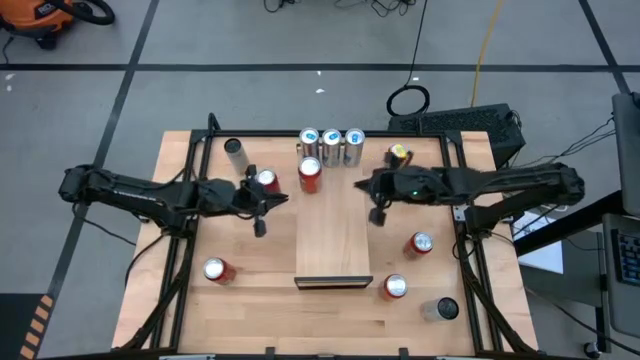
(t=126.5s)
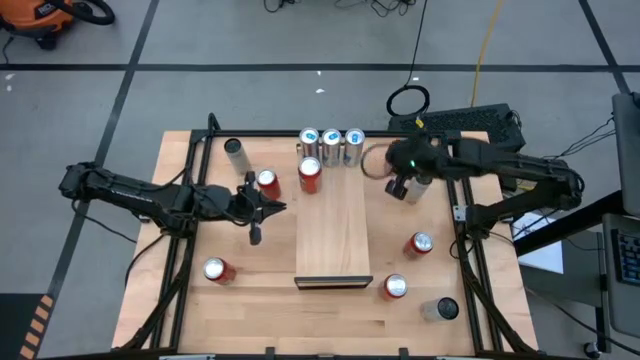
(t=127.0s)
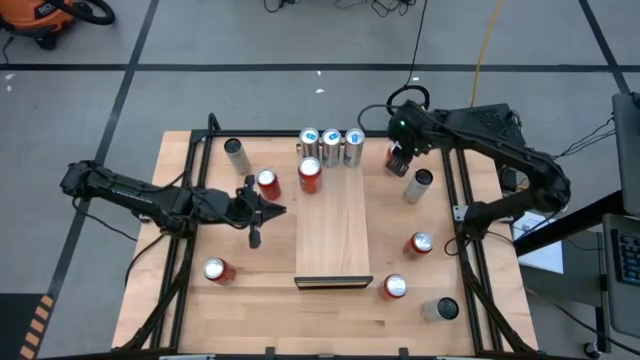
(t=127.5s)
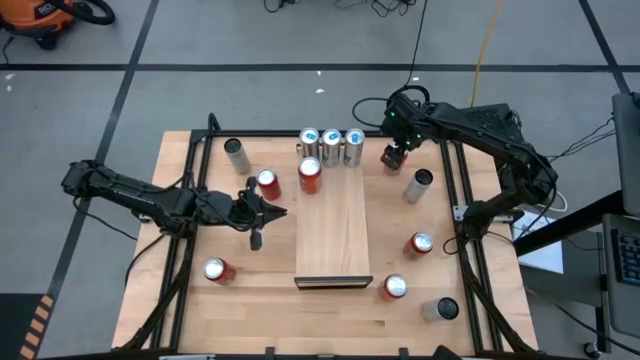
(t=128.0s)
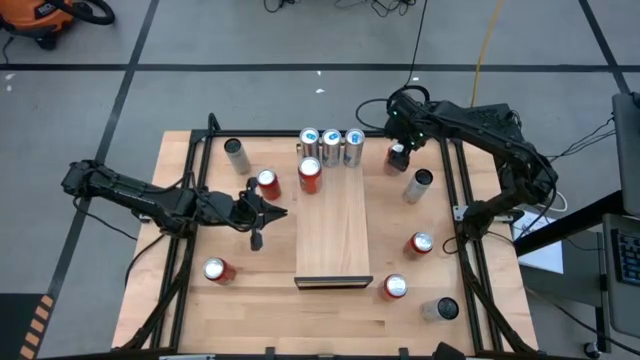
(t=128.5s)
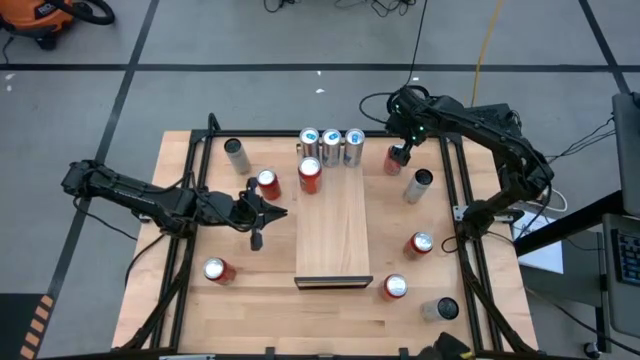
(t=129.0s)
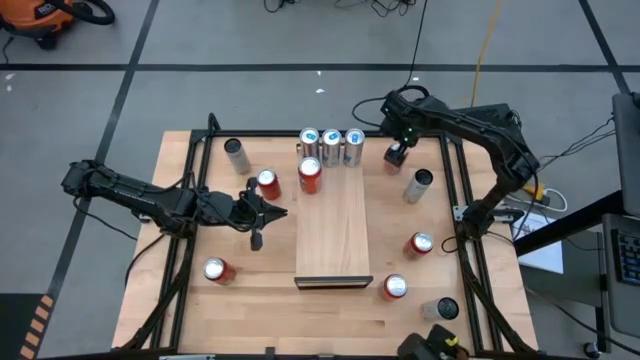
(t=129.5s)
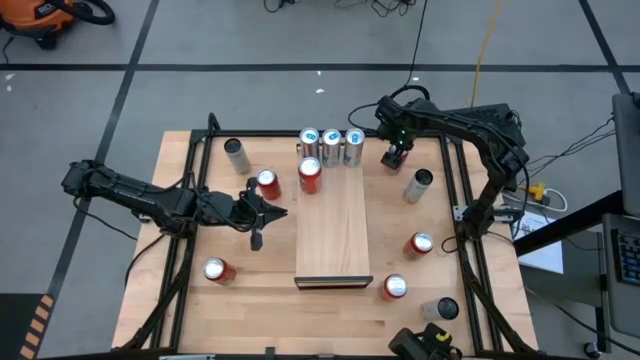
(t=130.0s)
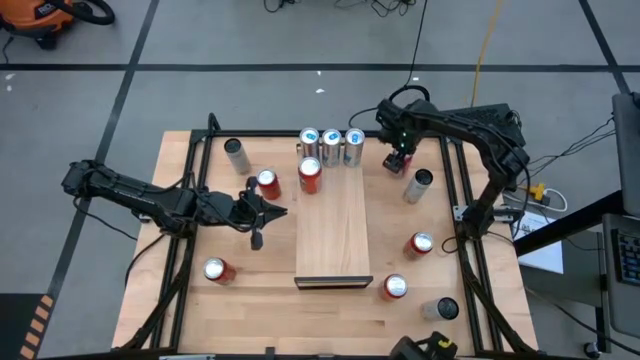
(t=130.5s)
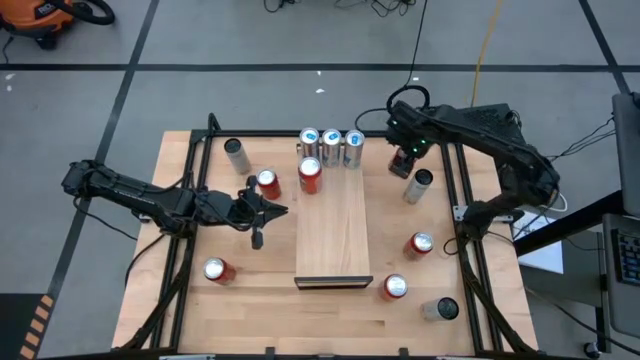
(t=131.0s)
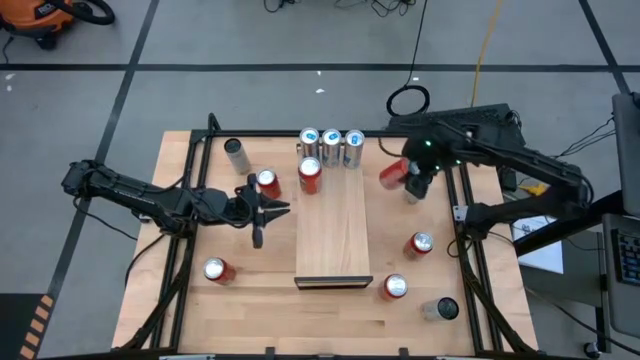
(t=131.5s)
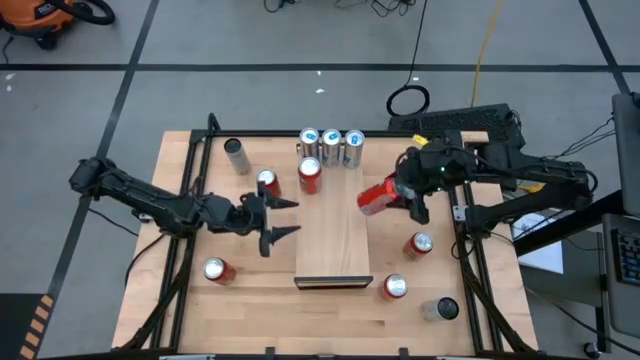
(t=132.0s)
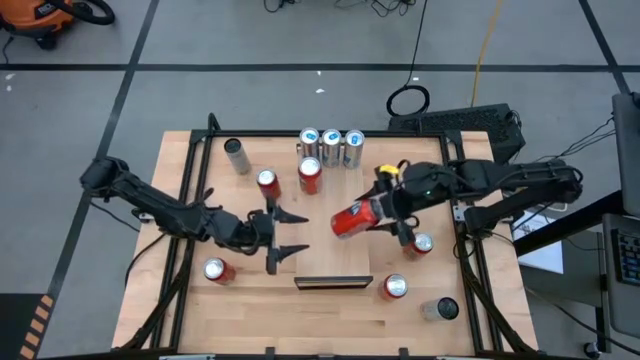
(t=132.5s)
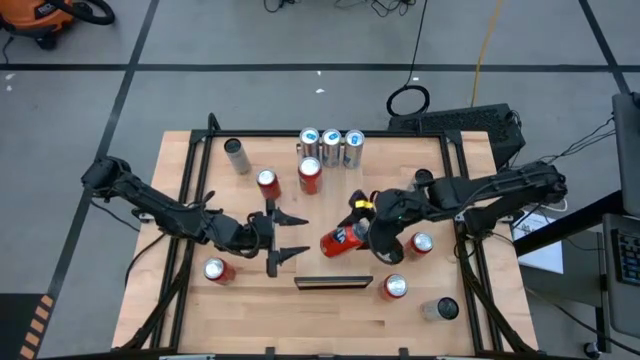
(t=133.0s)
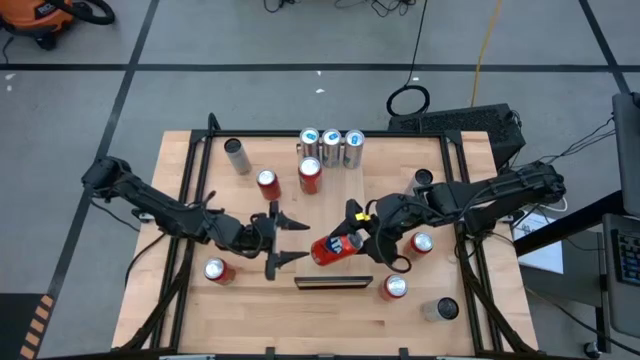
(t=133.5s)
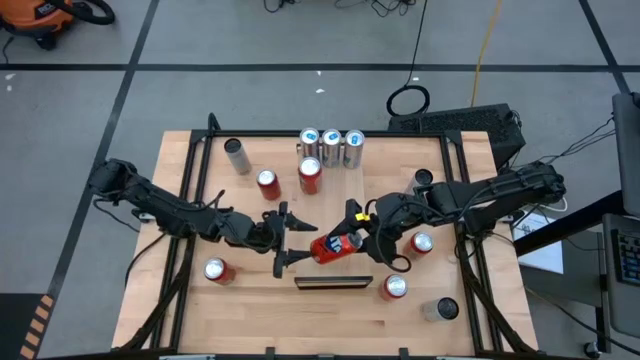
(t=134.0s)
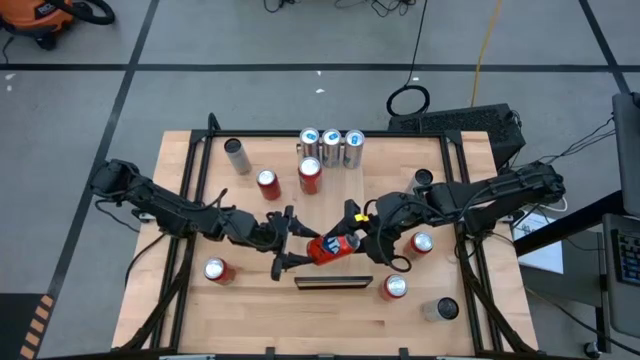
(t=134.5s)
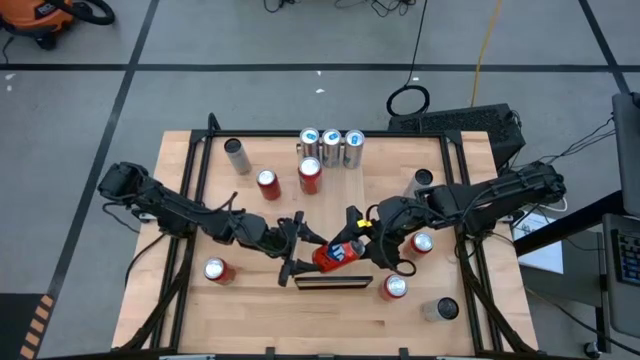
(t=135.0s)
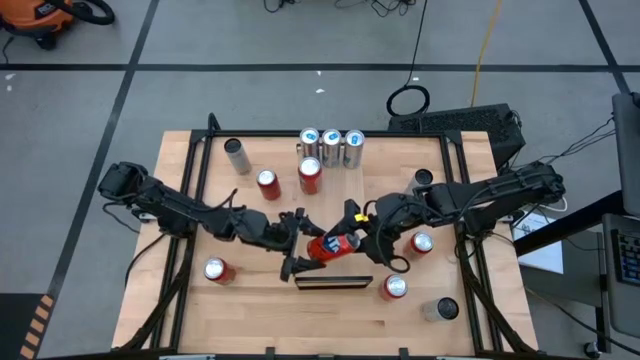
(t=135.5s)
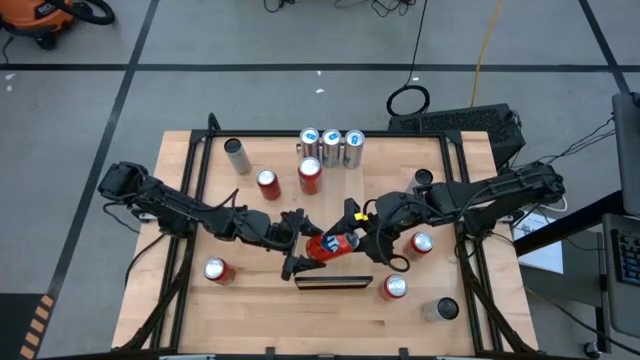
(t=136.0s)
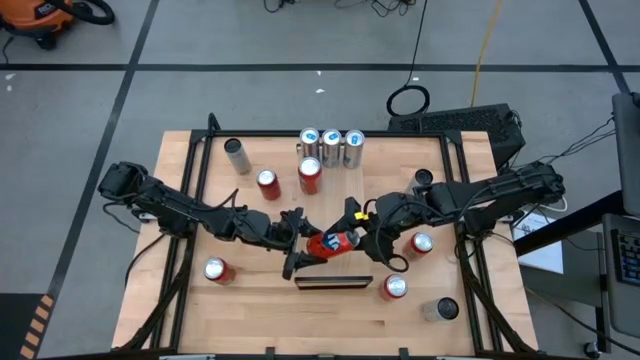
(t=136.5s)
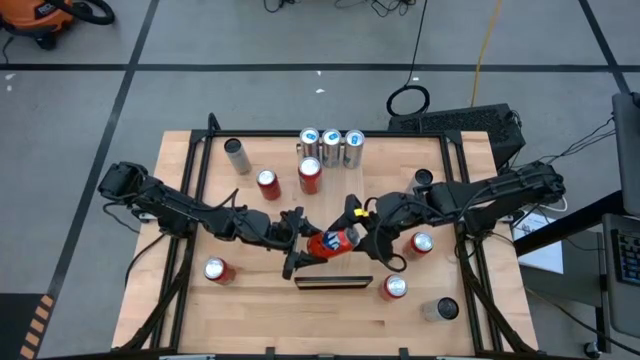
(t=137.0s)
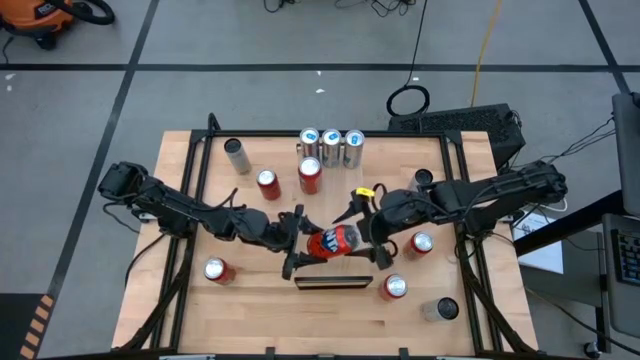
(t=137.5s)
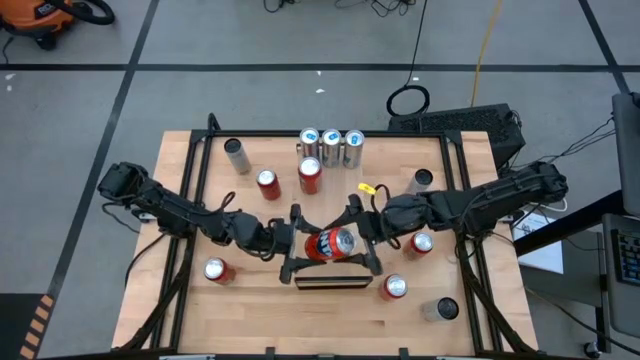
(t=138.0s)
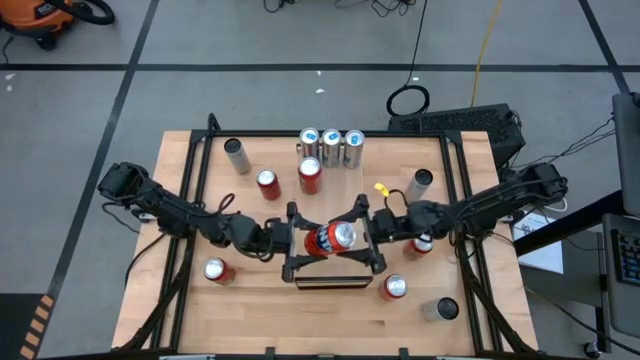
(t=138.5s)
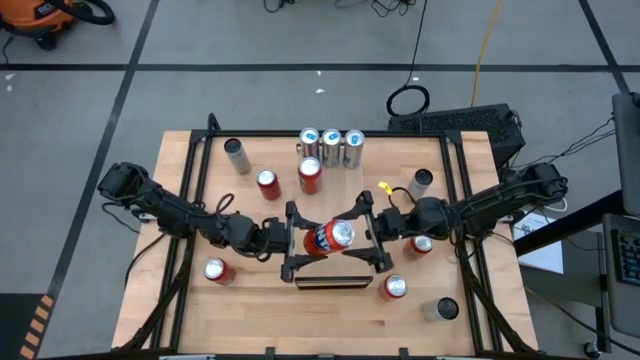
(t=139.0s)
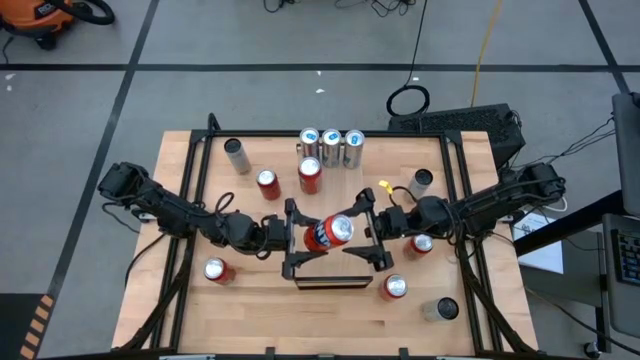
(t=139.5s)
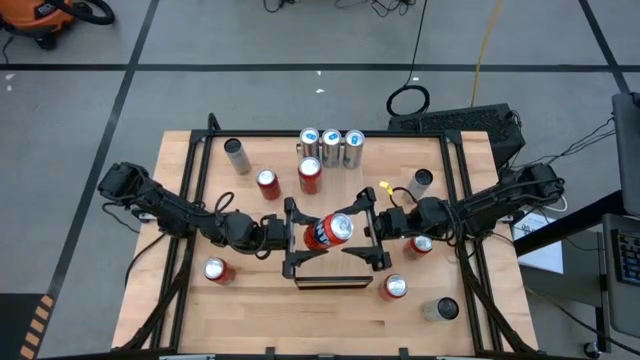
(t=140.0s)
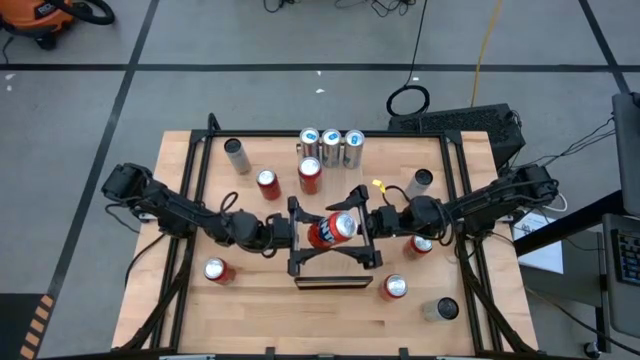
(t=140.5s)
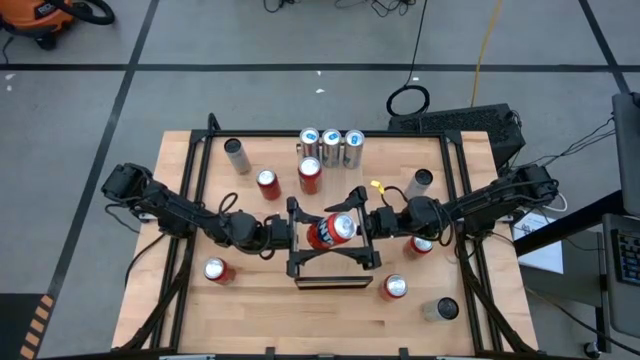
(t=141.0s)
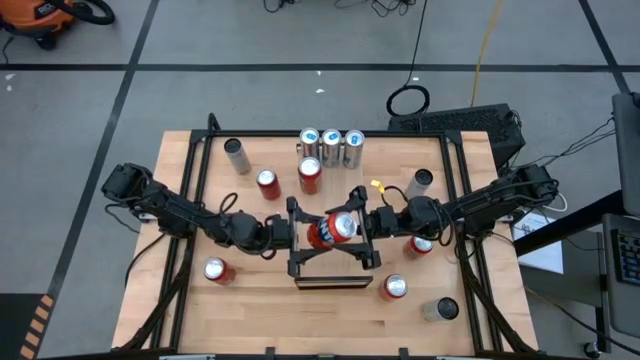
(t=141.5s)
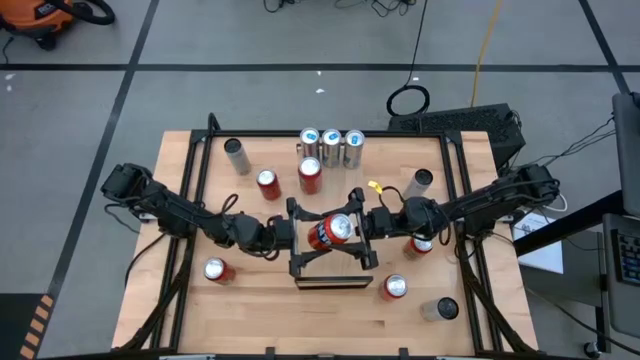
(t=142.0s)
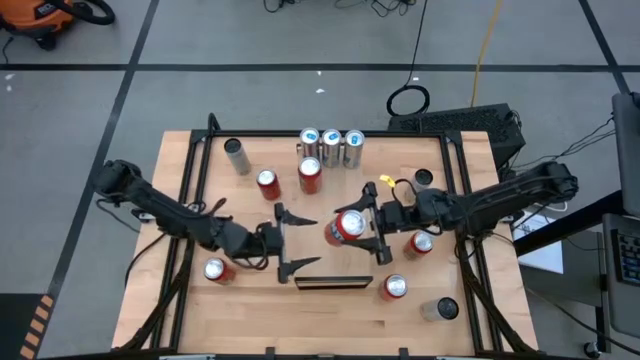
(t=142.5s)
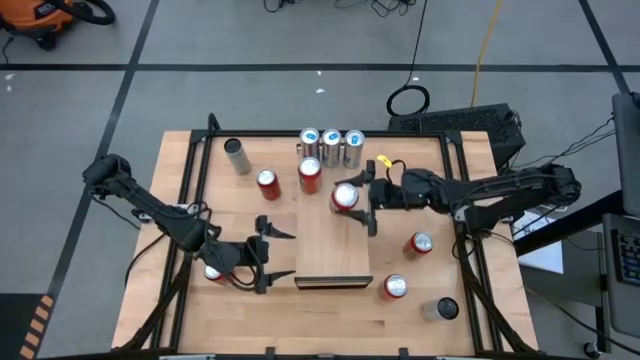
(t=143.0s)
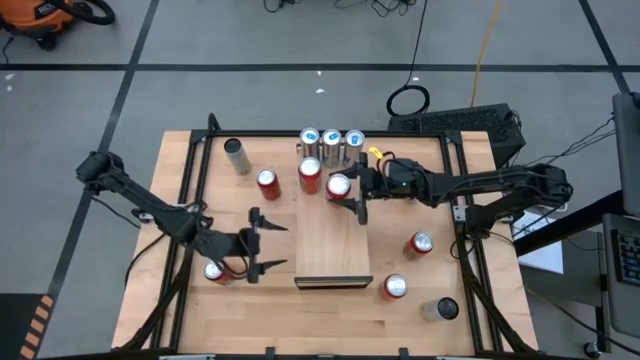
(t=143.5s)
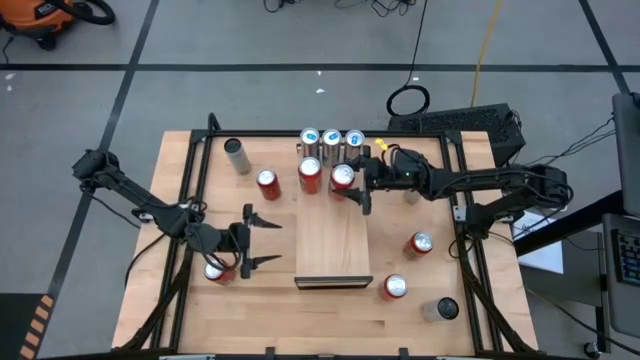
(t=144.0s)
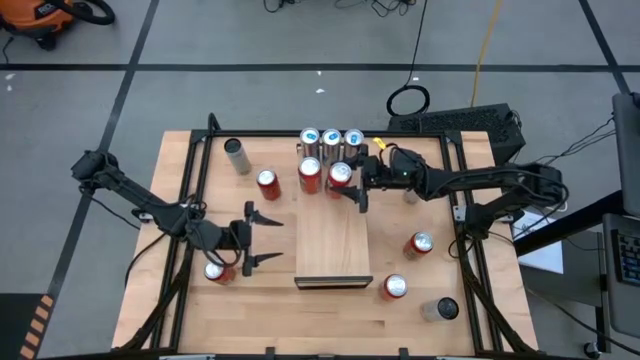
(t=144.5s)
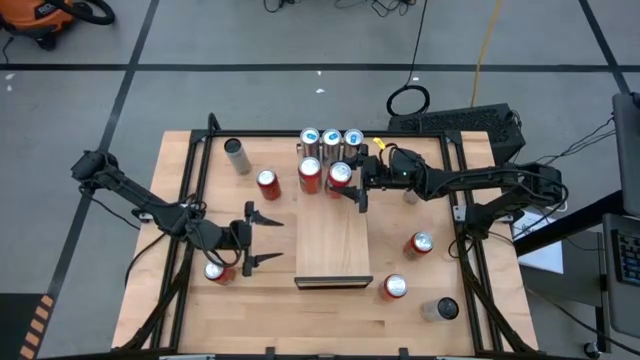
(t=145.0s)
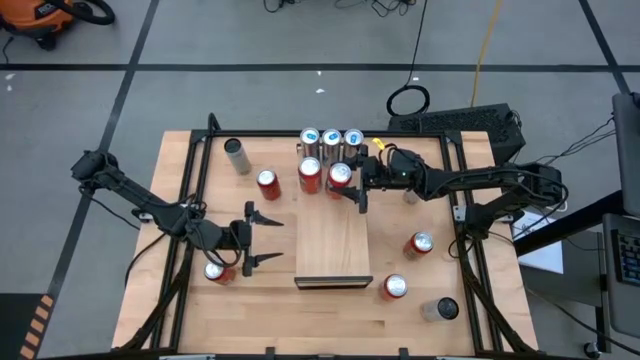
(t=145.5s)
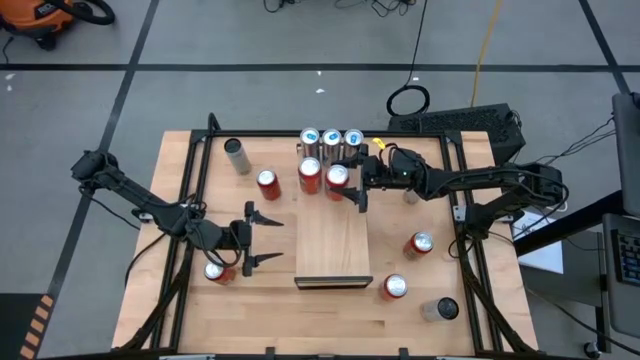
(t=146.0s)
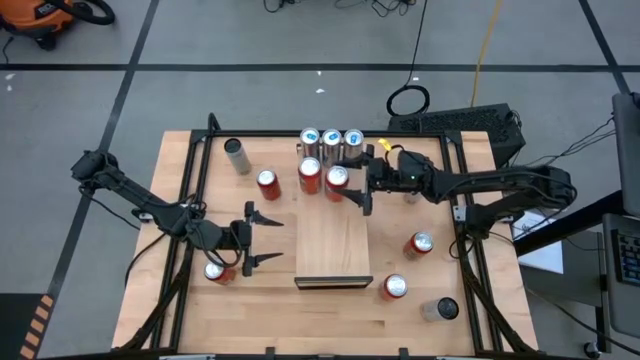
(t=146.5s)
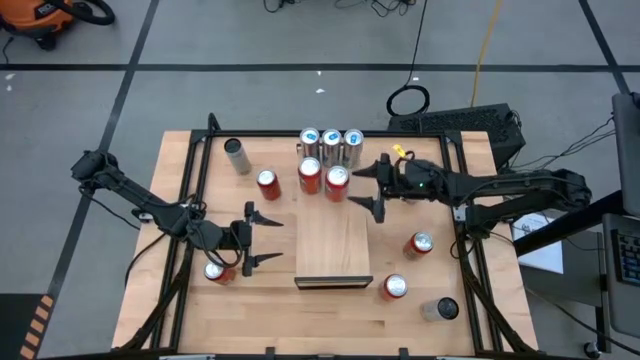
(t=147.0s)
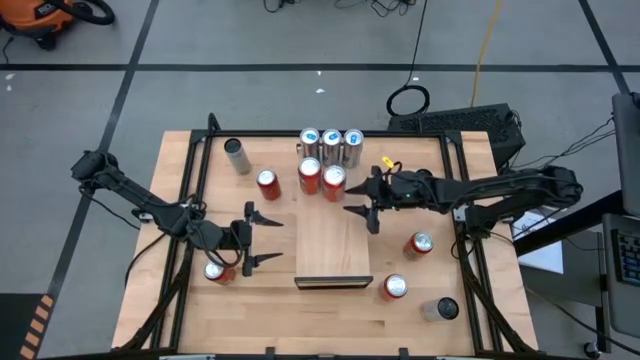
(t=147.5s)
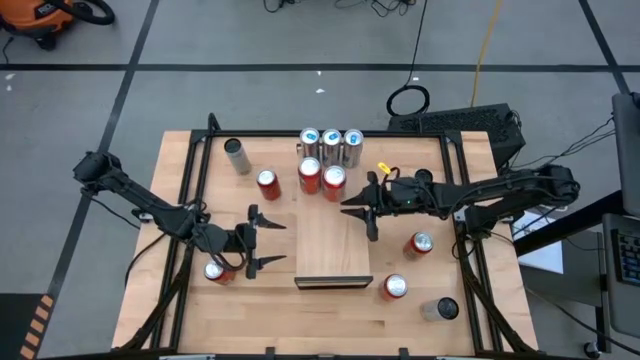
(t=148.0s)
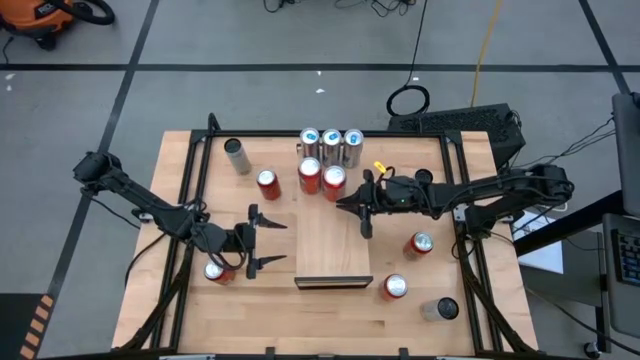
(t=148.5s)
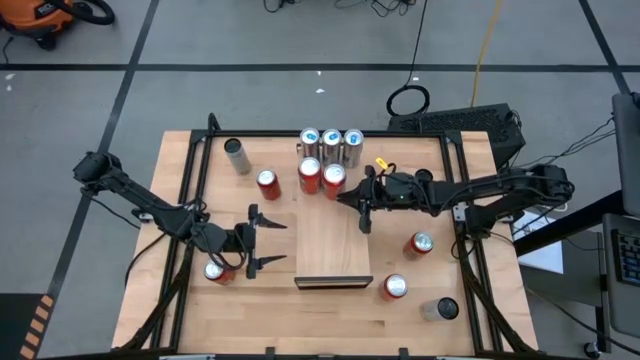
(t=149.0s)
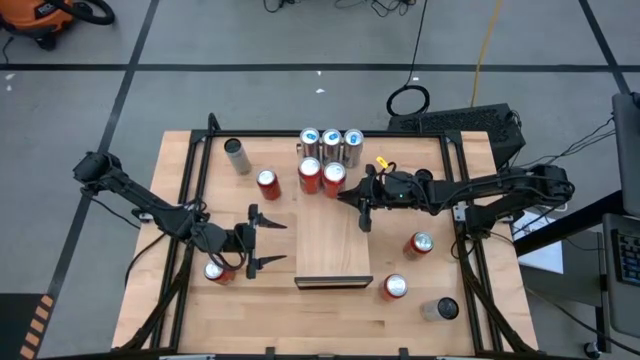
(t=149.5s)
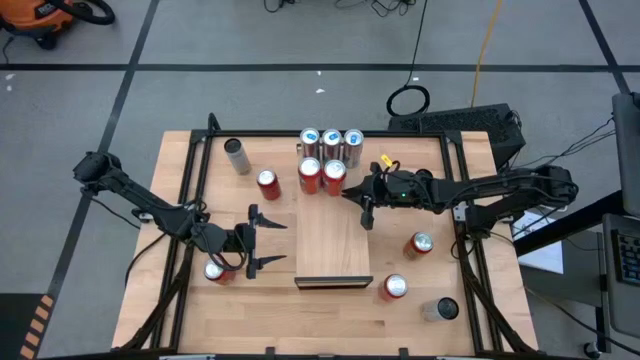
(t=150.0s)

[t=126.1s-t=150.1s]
Task: Place canned beverage on shelf
Put the top red soda can on the shelf aligned with the other red soda can
